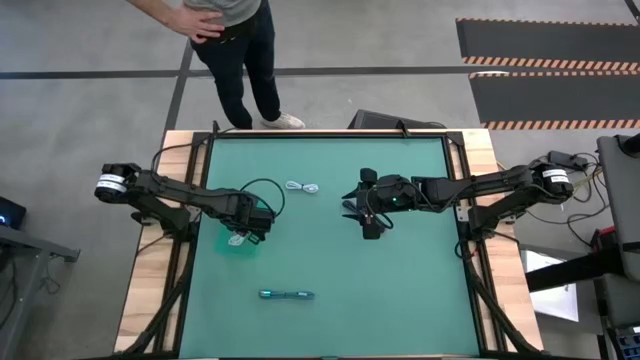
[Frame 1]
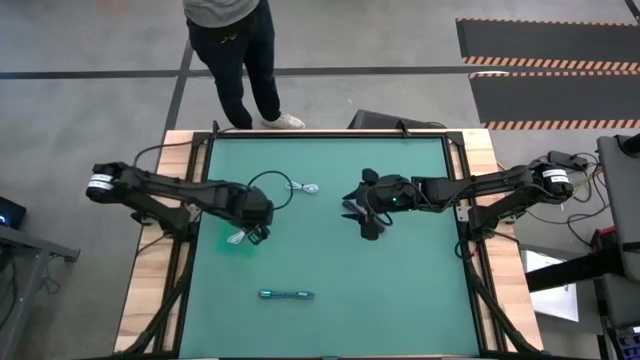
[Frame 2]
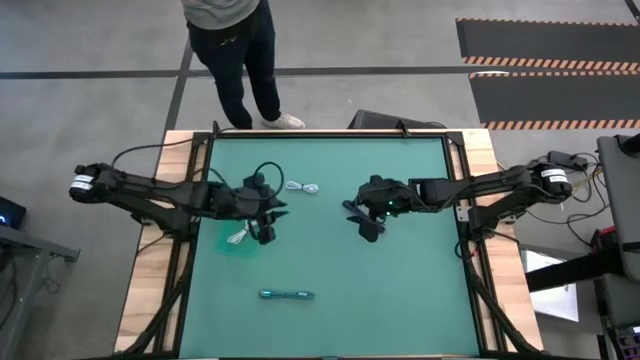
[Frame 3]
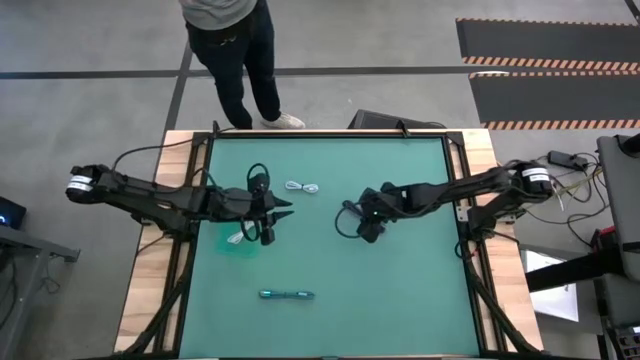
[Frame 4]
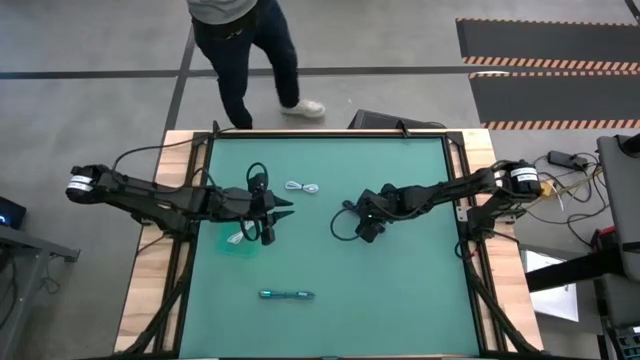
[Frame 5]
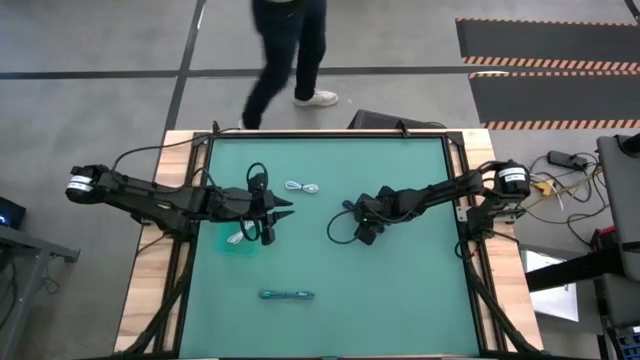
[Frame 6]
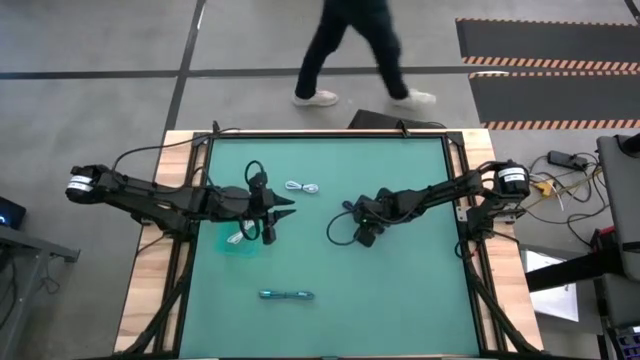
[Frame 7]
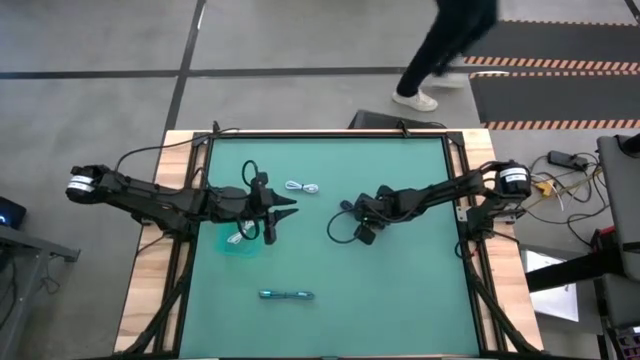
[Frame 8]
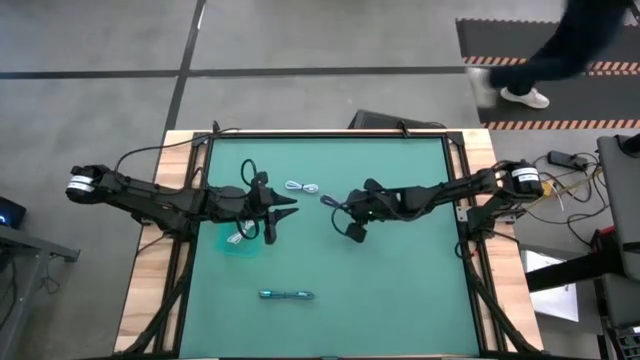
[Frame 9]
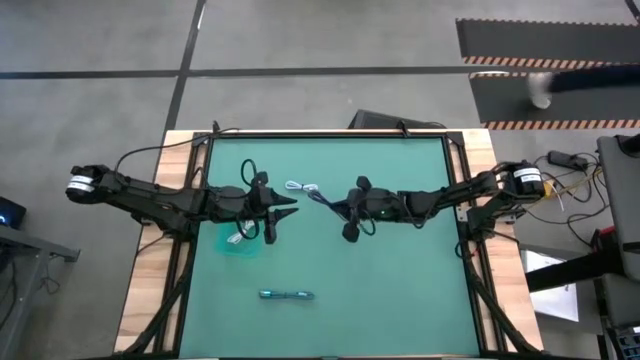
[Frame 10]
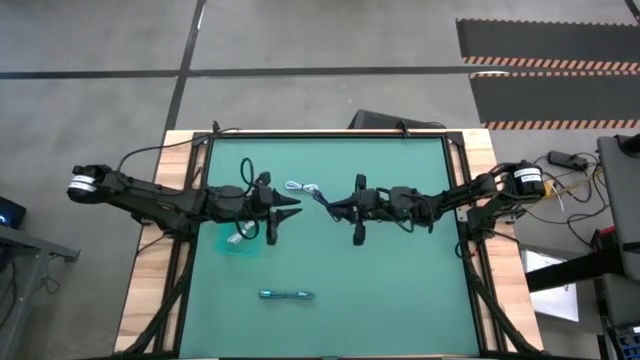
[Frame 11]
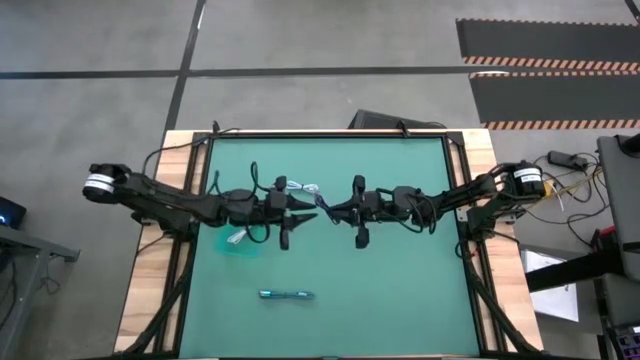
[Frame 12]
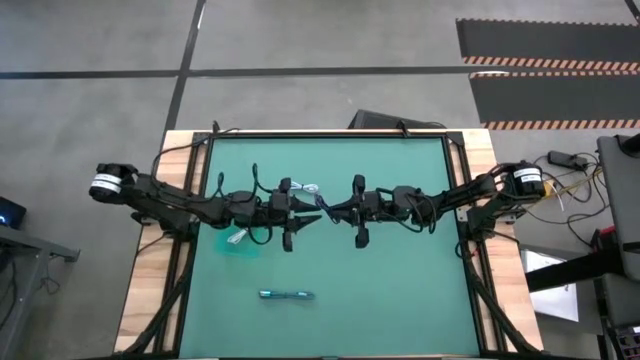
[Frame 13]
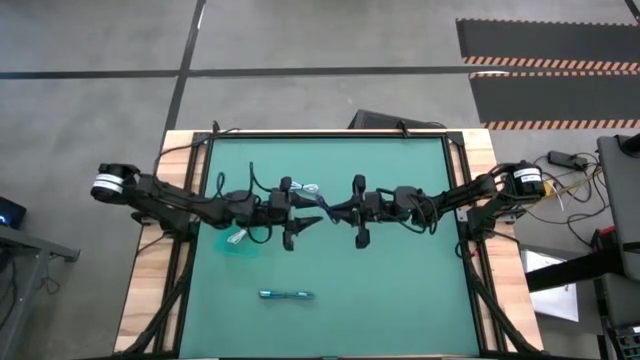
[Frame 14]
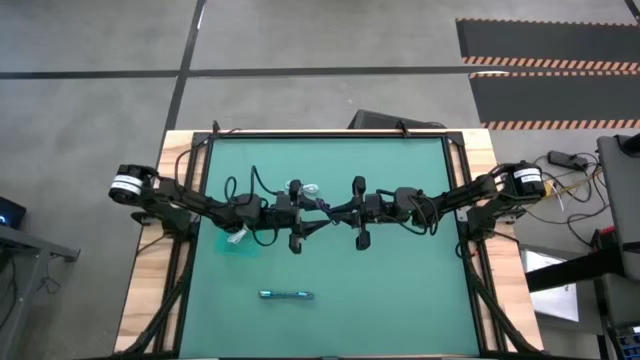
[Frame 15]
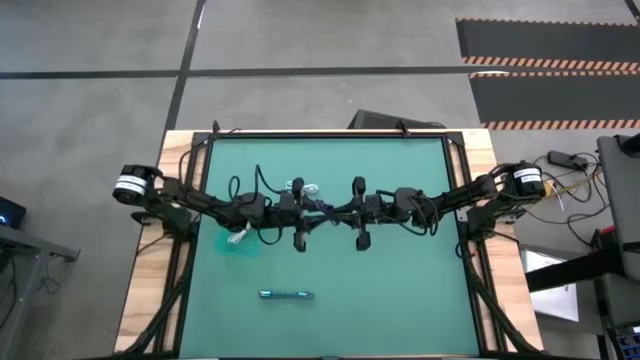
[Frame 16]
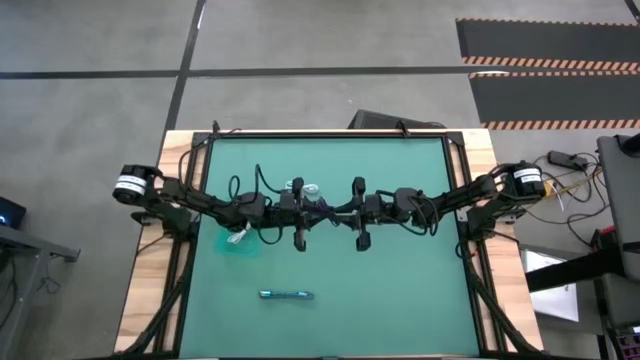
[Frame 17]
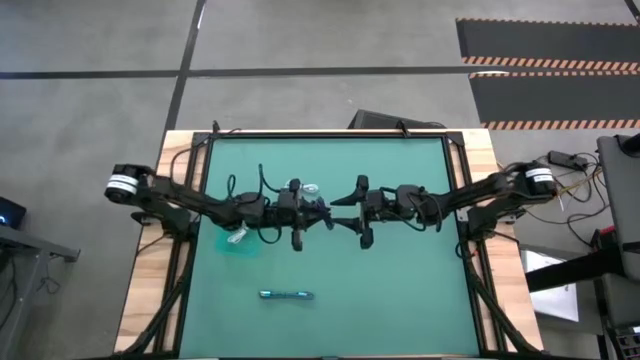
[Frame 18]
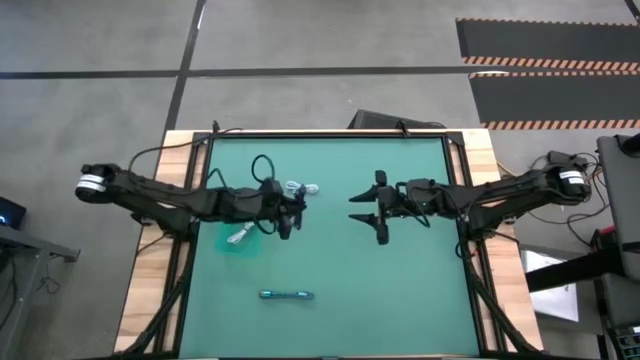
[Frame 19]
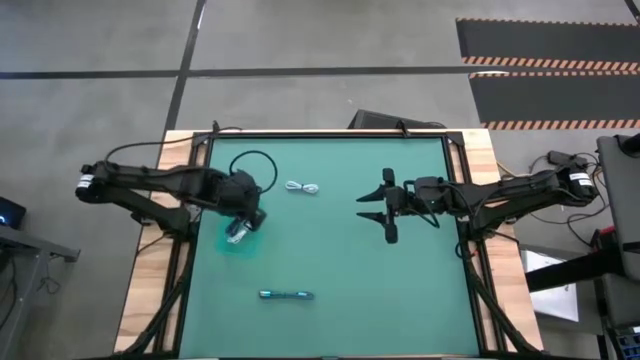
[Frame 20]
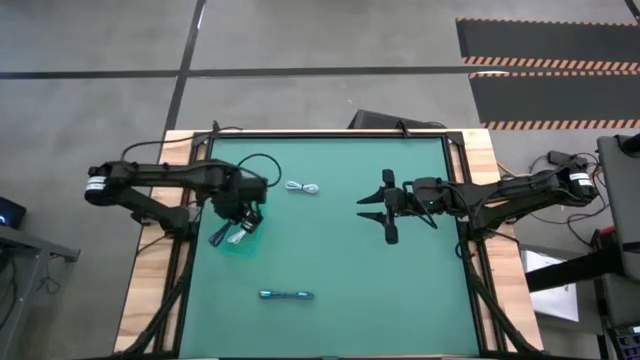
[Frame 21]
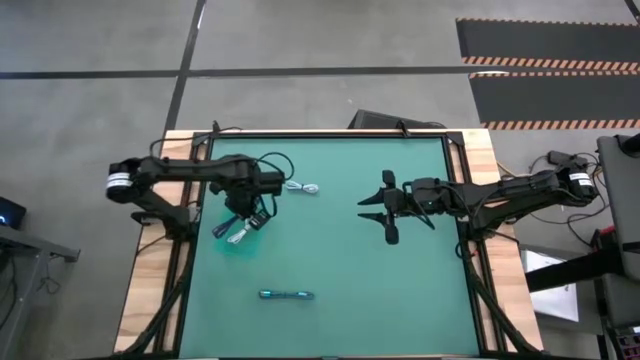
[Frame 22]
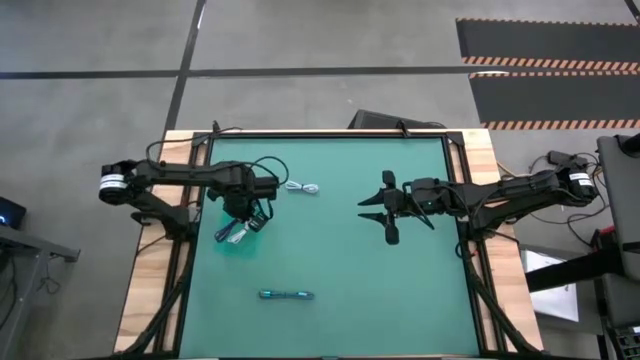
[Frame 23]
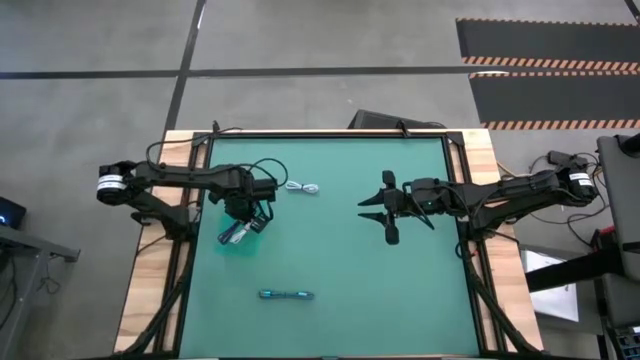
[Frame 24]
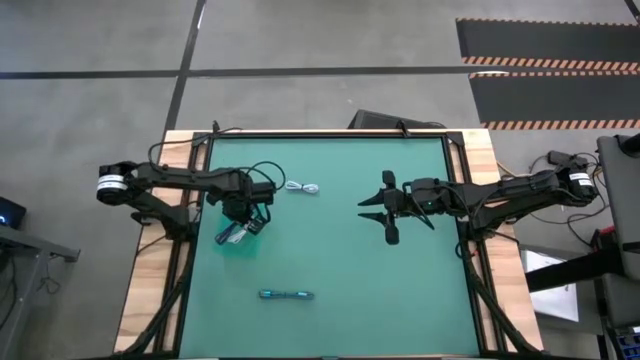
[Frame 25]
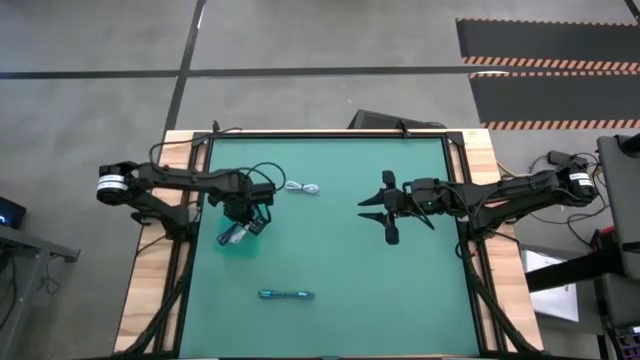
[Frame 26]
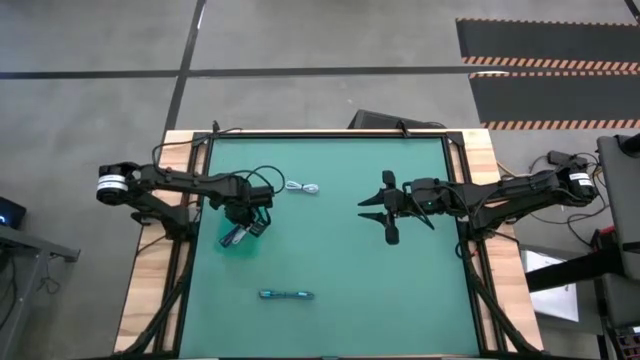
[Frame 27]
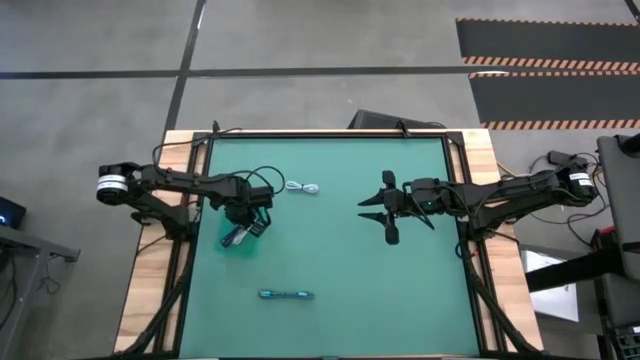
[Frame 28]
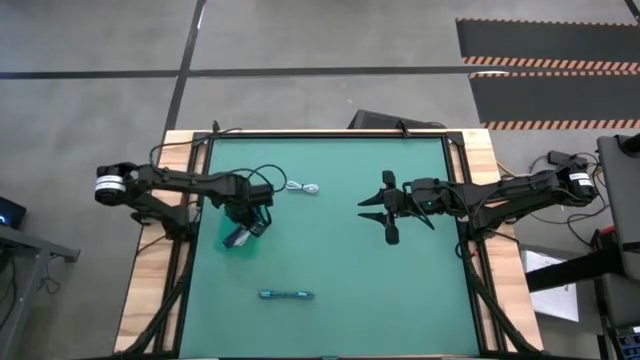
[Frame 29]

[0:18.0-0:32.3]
Task: Pick and place USB-C Cables
Put the purple charger cable into the green bin

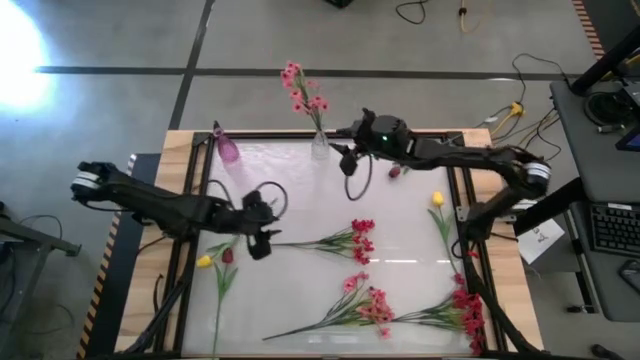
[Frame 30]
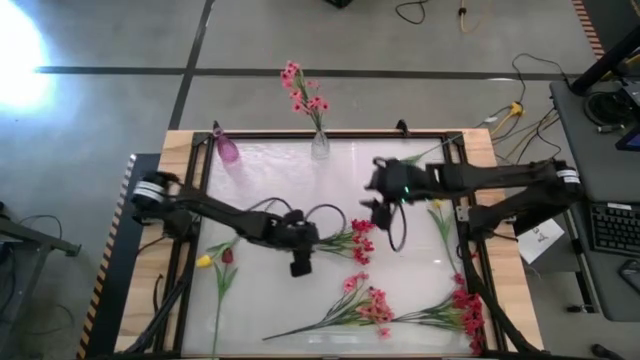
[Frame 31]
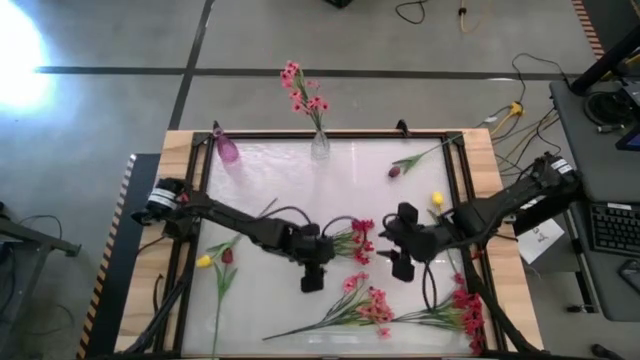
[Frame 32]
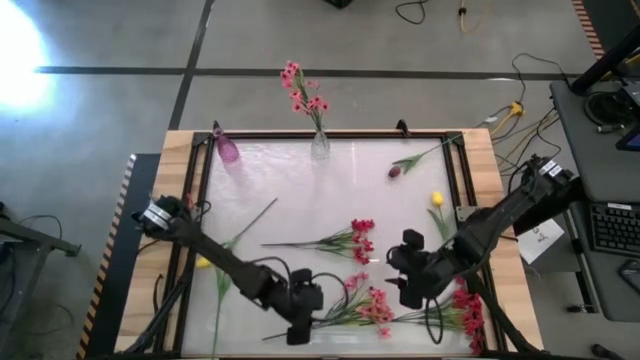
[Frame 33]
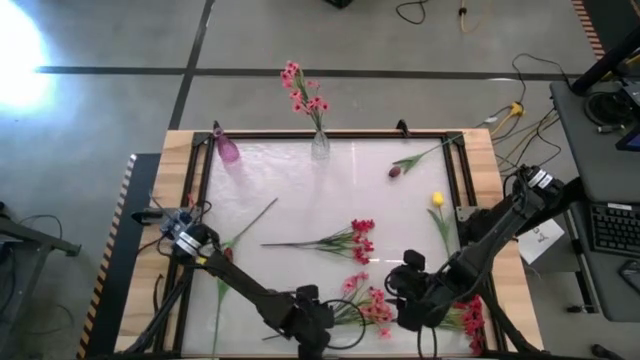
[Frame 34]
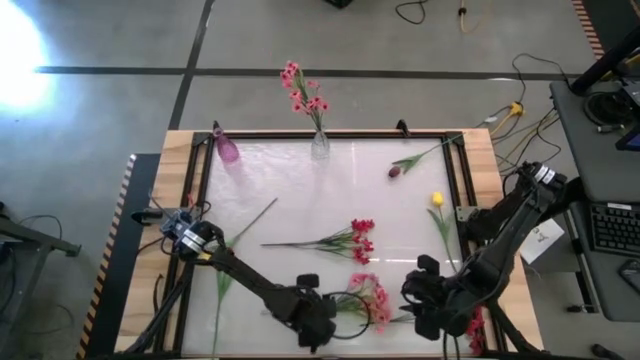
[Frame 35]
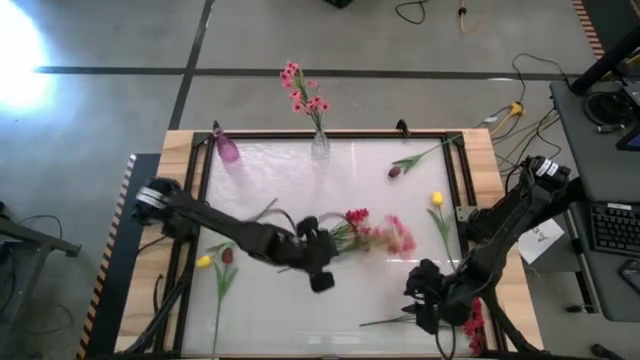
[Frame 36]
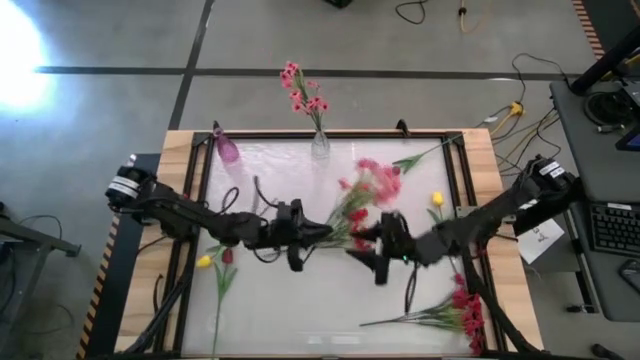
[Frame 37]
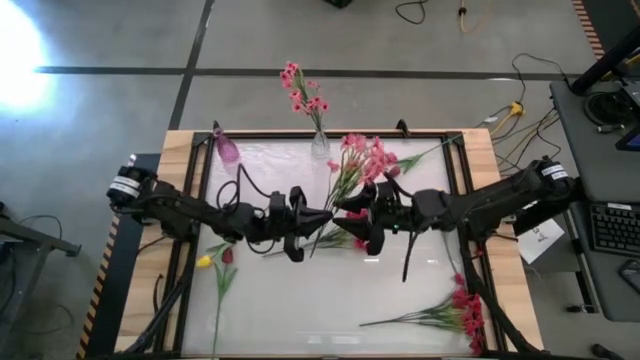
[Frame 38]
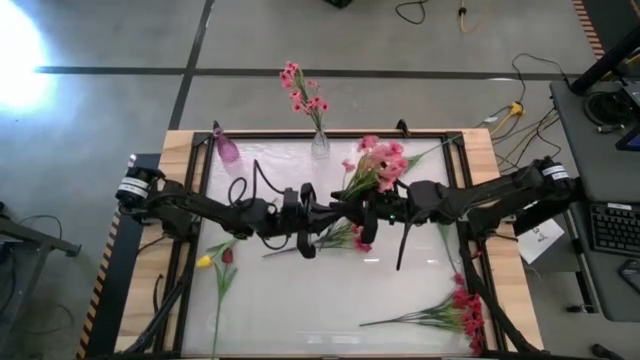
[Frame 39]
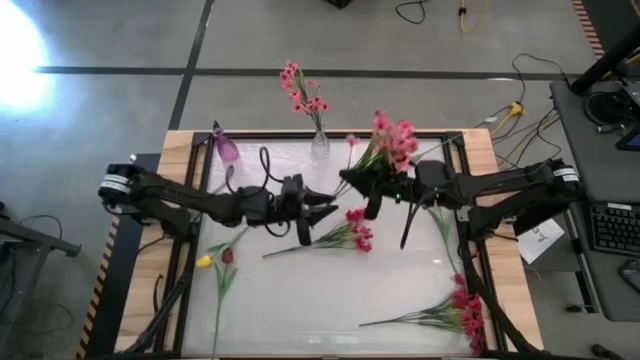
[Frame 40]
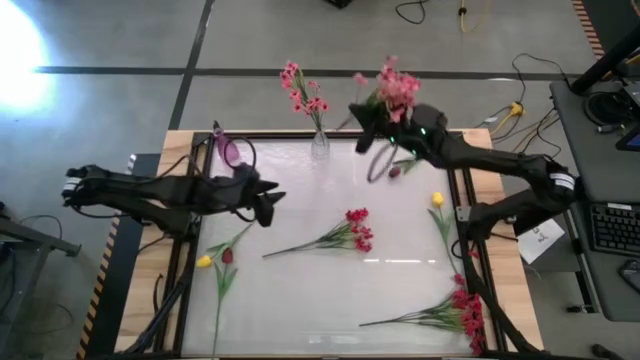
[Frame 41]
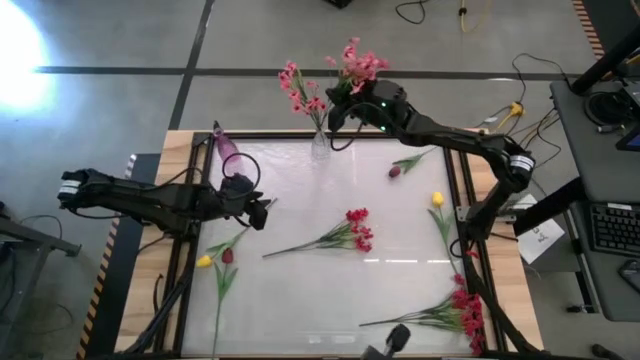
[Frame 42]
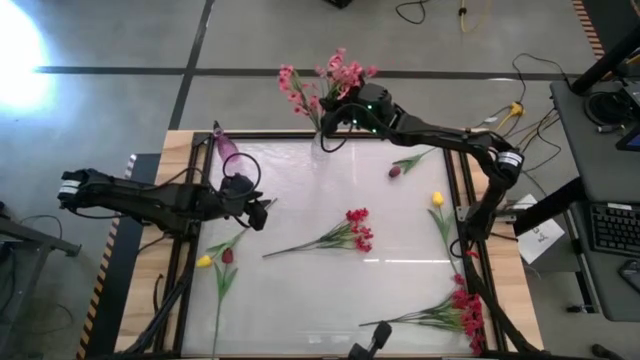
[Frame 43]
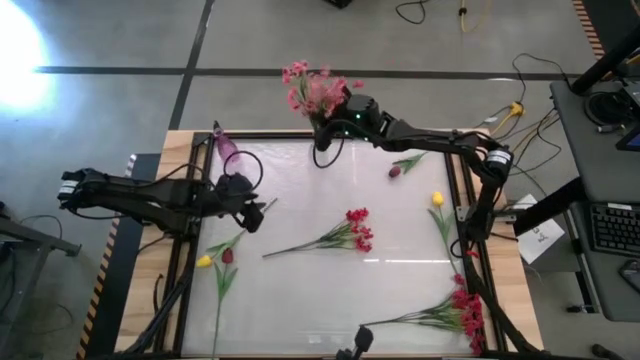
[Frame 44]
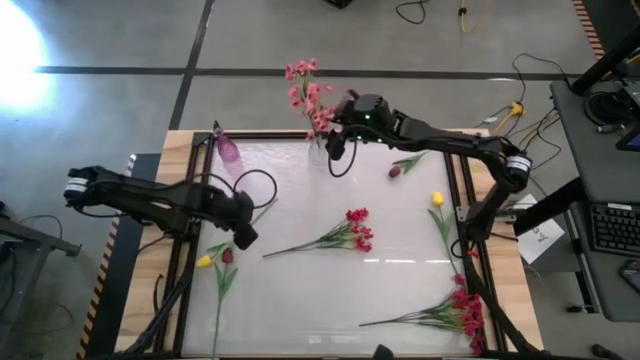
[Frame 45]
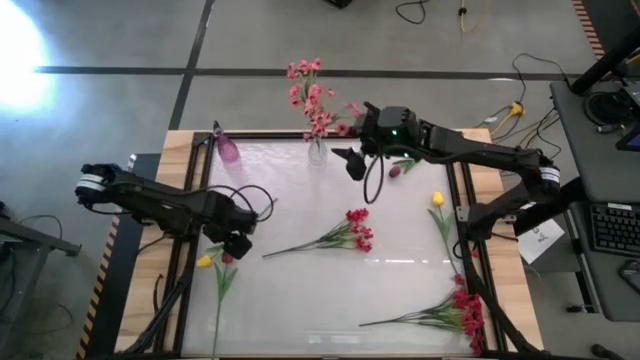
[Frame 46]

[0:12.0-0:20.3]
Task: Sort flowers into vase by color
Put the pink flowers into the transparent vase
